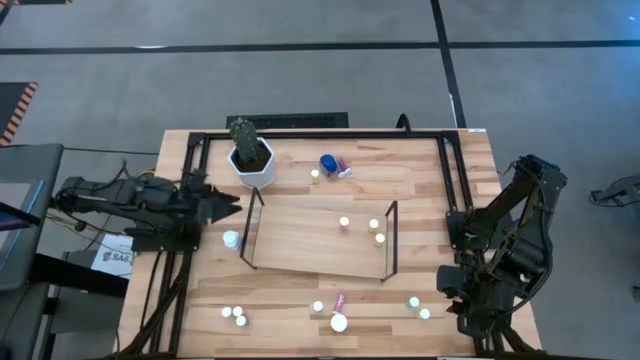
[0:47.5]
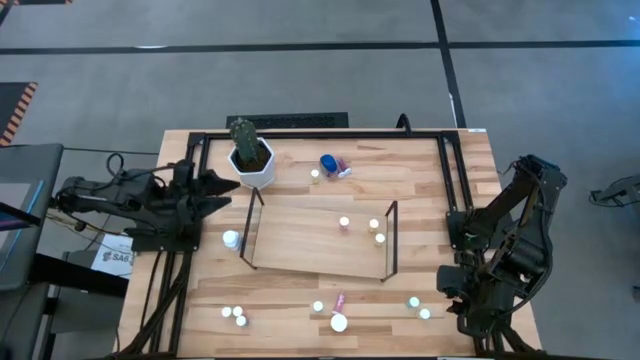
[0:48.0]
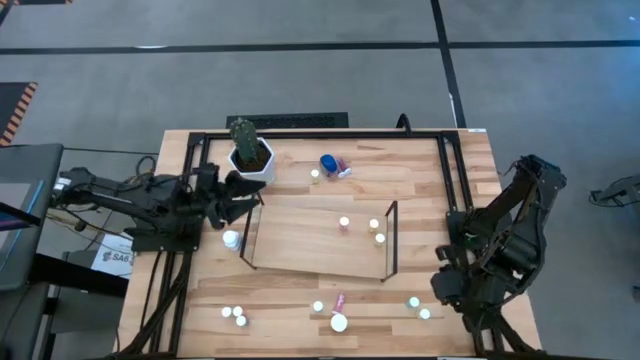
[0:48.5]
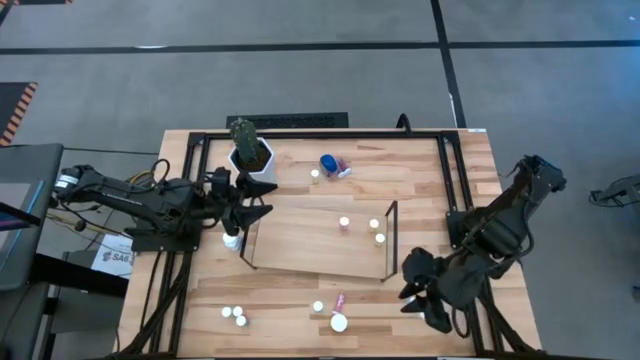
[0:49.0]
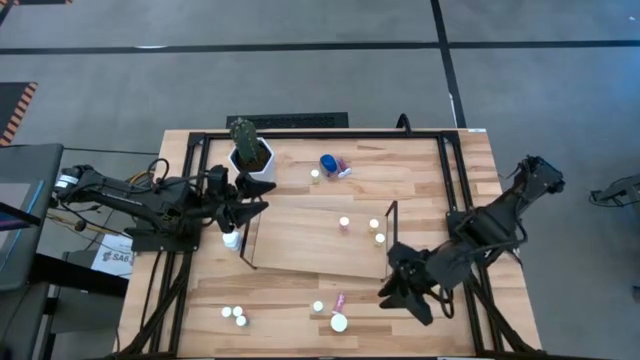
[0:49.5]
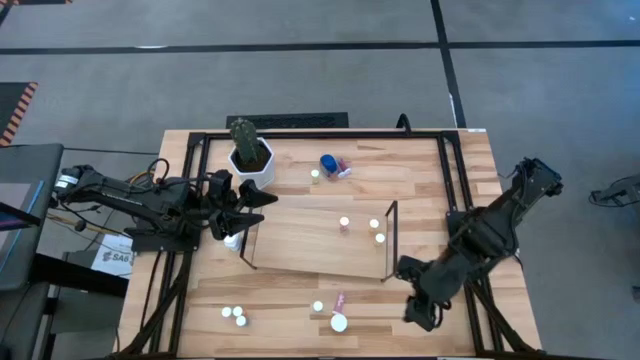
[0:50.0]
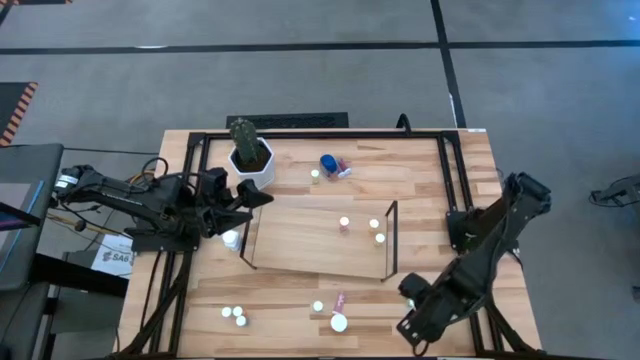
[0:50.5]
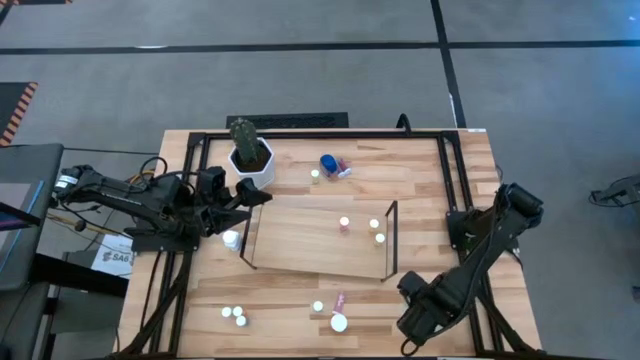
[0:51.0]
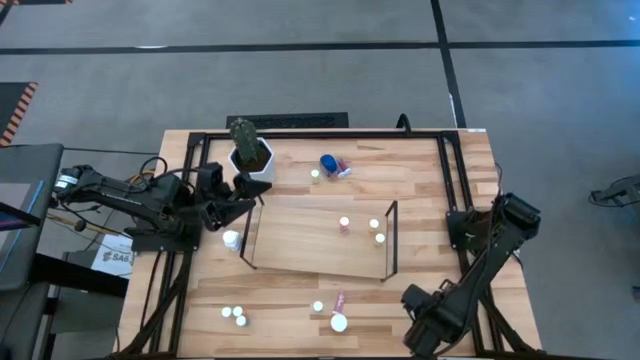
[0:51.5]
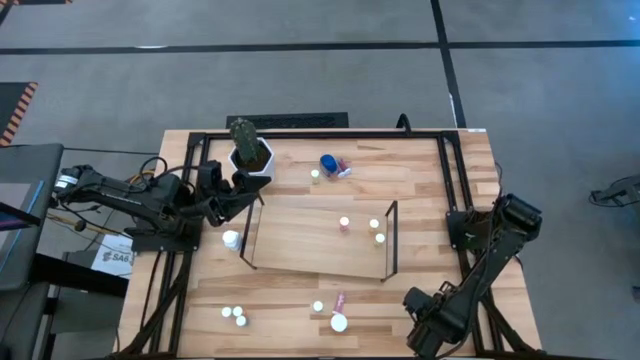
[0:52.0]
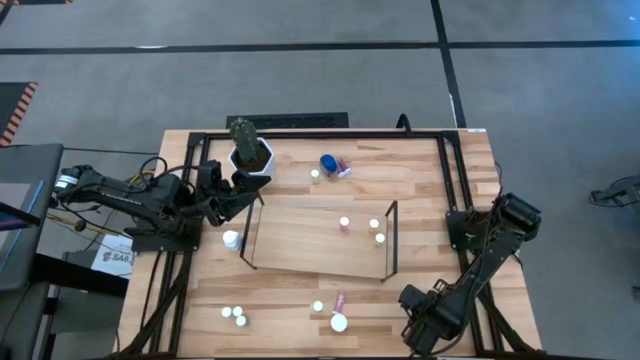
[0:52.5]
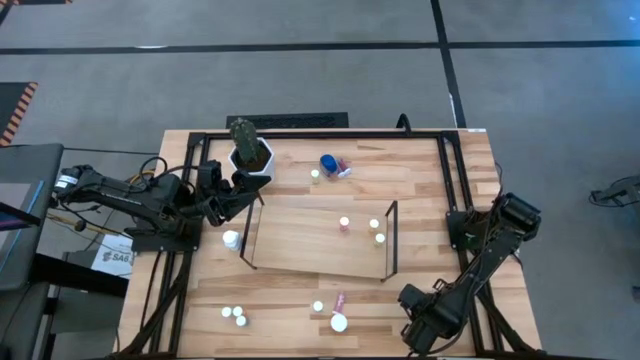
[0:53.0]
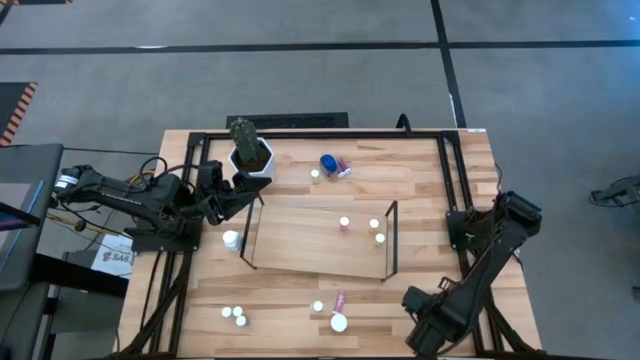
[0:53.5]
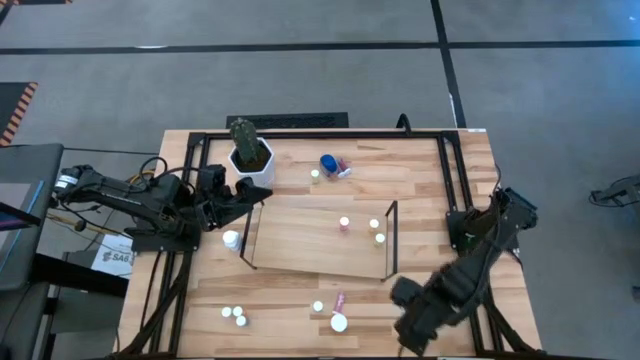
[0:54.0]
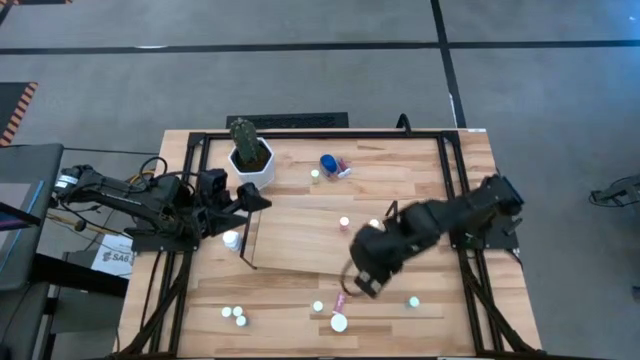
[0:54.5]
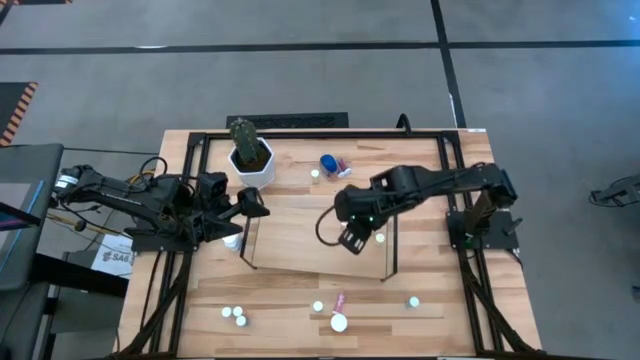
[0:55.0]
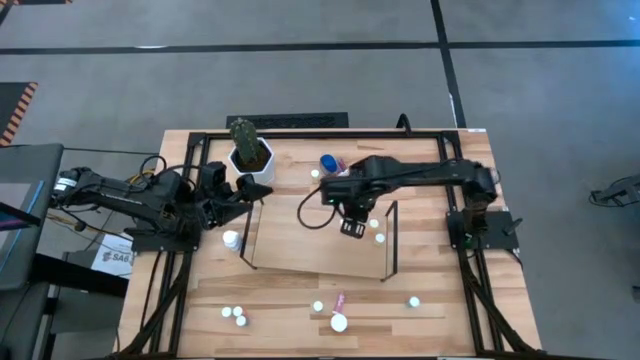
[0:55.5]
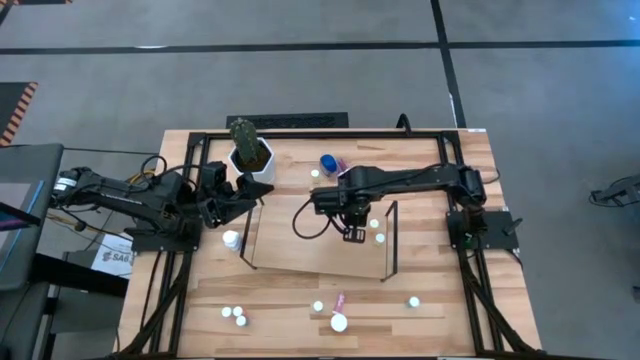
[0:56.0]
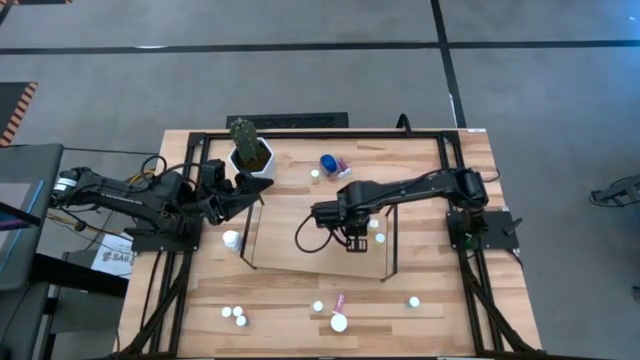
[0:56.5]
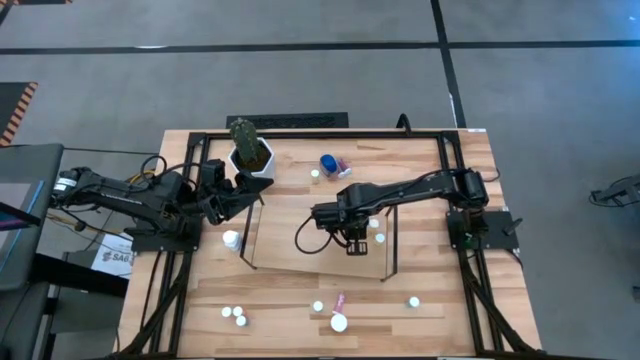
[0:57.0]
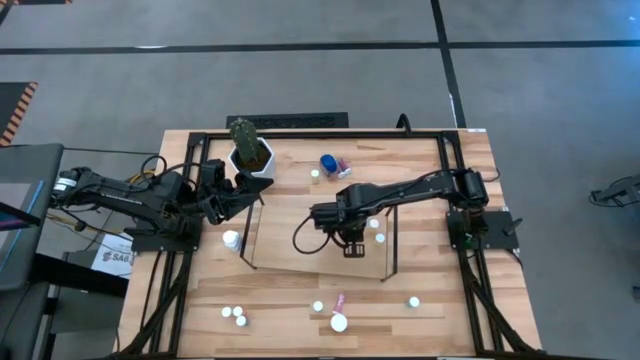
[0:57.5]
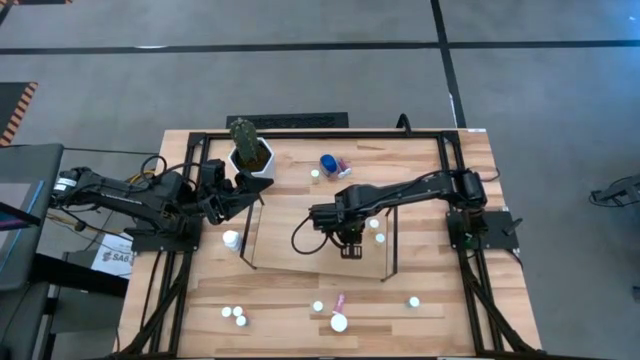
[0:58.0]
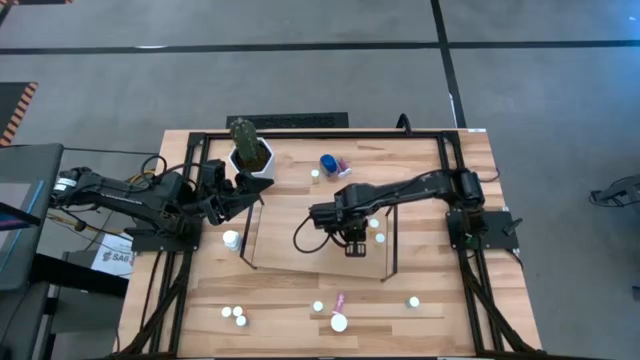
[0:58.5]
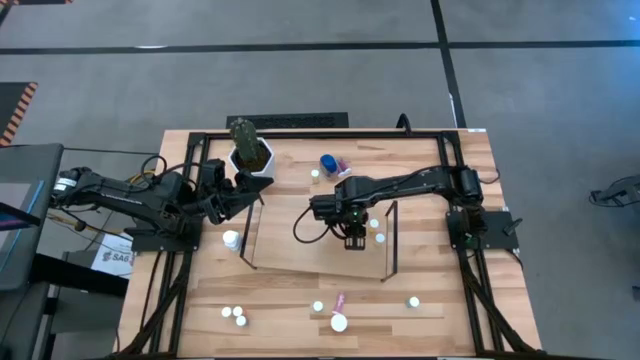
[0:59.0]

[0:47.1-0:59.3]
Task: Pick and place medicine bottles onto shelf by color
Put the orange pill bottle on the shelf

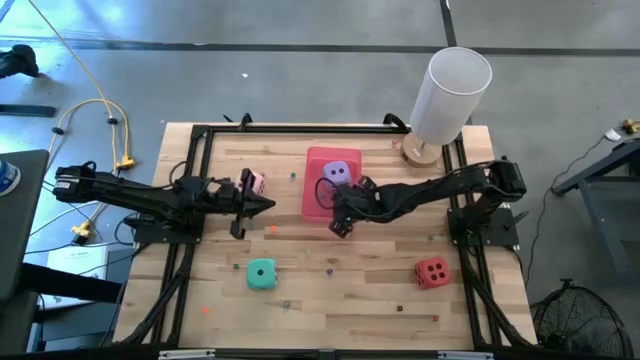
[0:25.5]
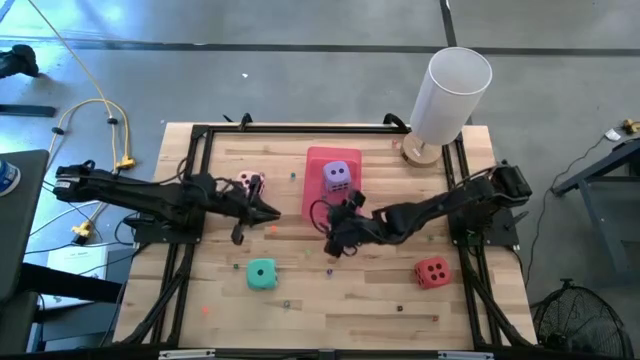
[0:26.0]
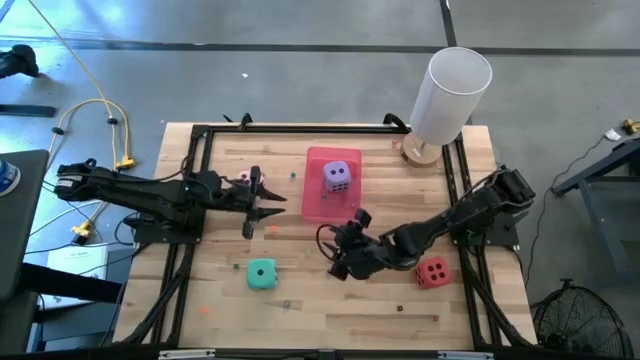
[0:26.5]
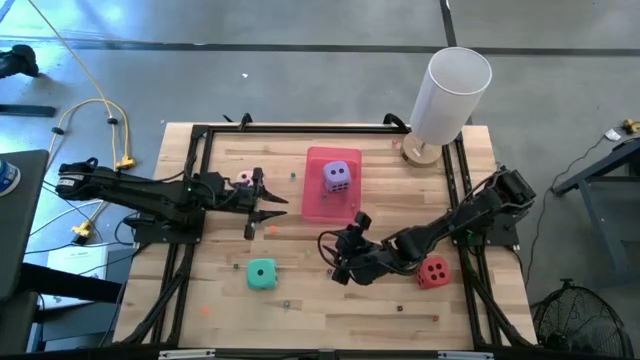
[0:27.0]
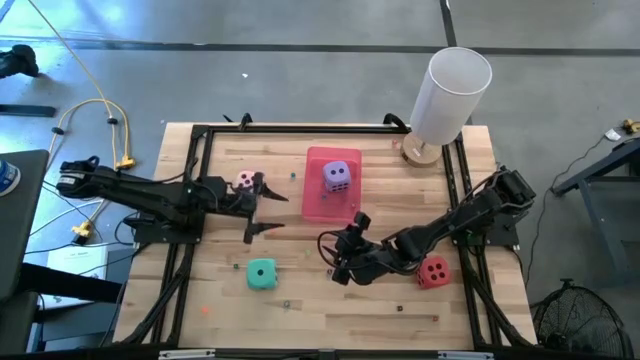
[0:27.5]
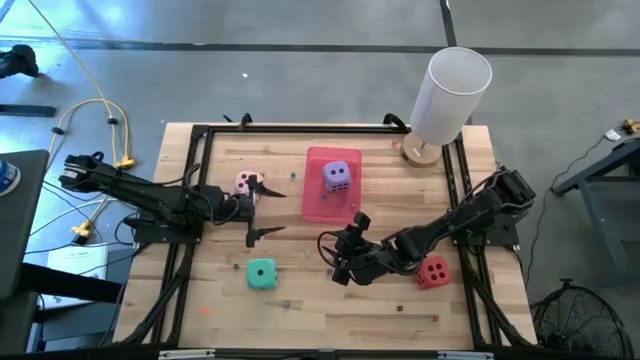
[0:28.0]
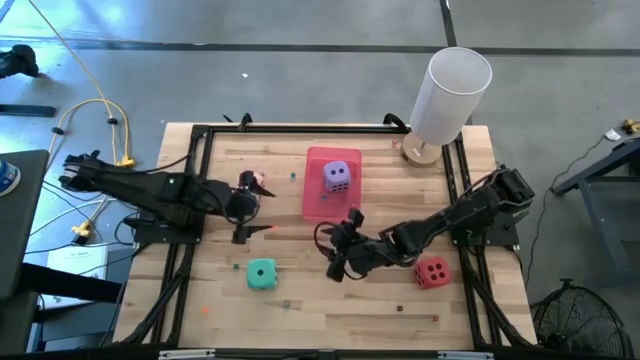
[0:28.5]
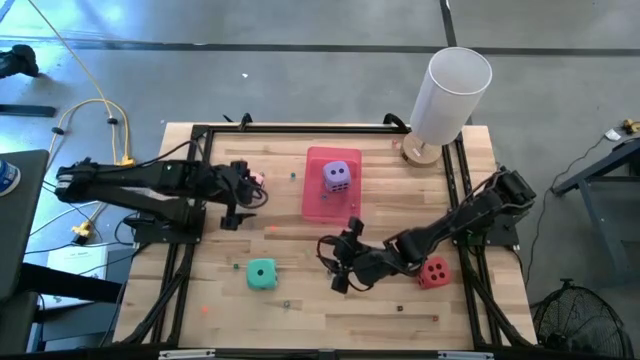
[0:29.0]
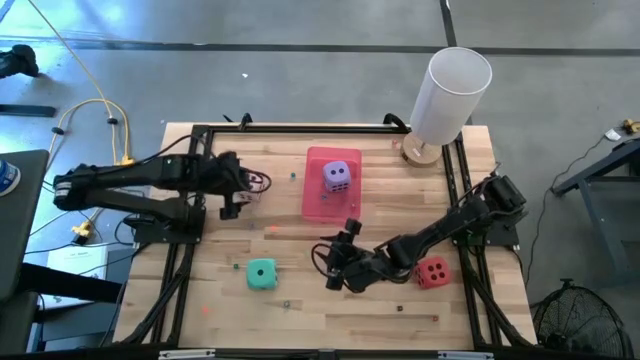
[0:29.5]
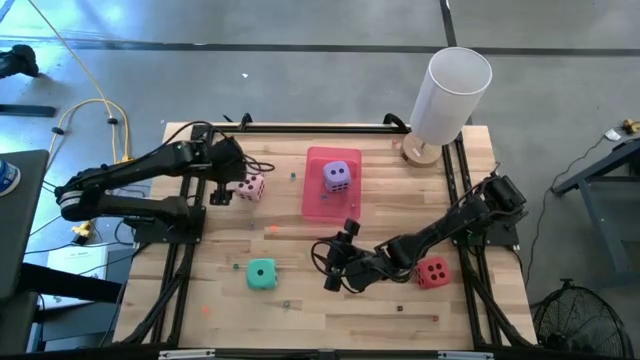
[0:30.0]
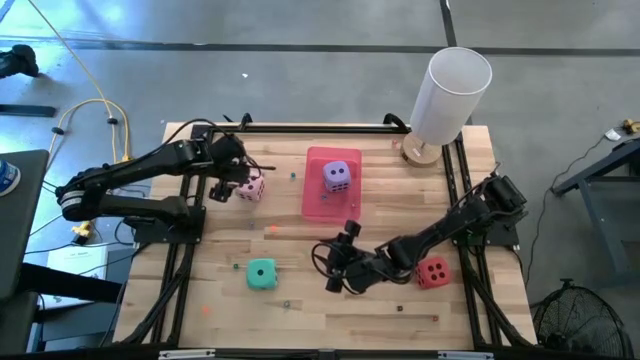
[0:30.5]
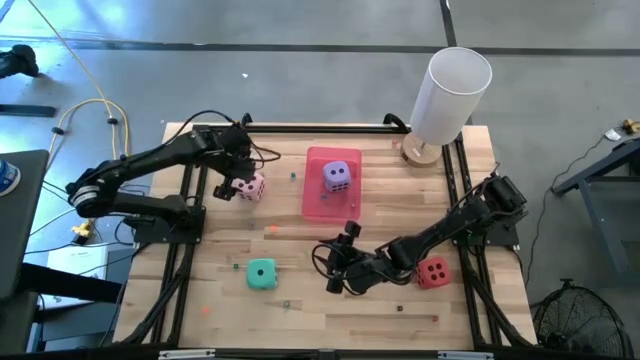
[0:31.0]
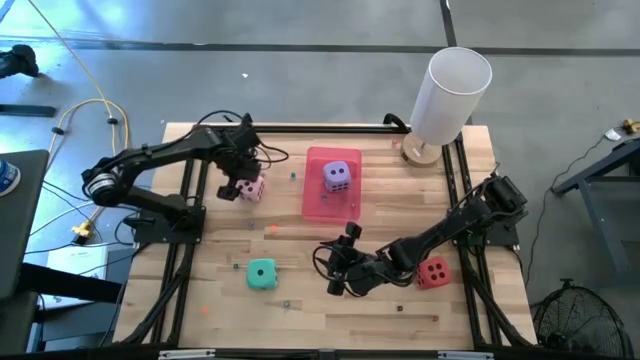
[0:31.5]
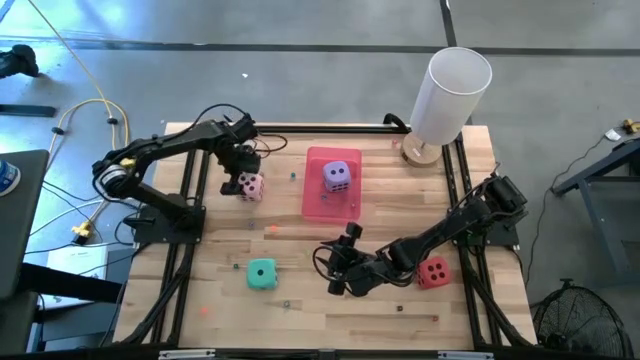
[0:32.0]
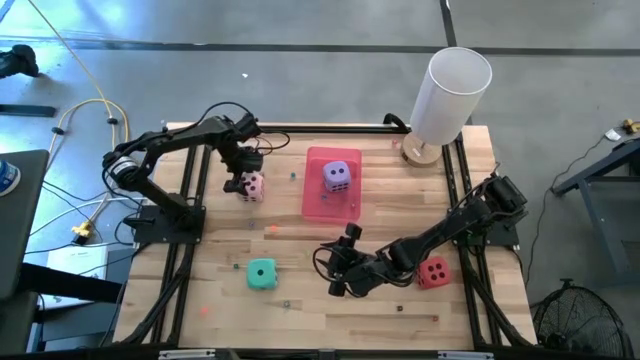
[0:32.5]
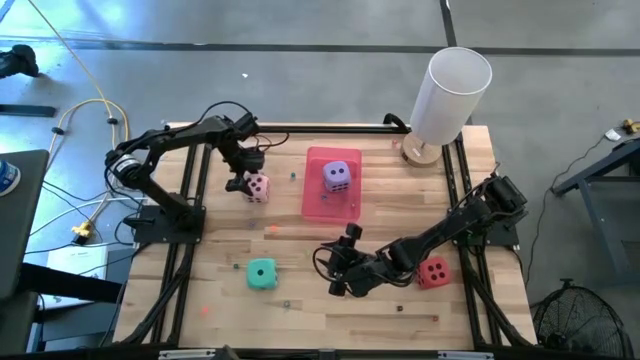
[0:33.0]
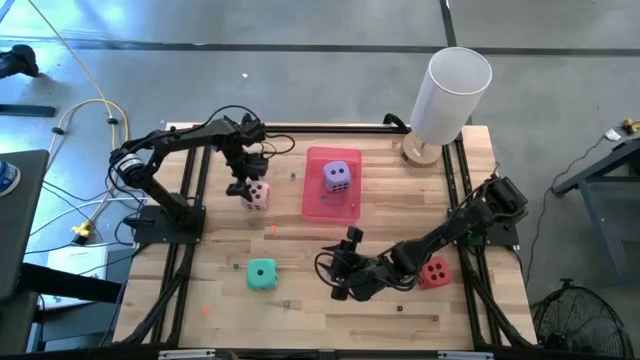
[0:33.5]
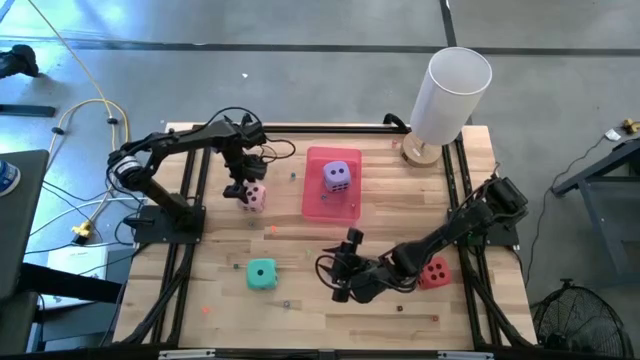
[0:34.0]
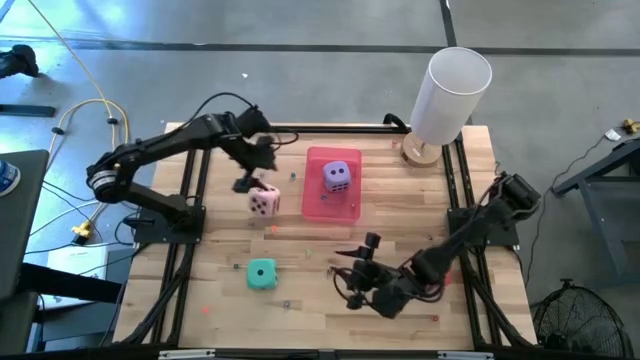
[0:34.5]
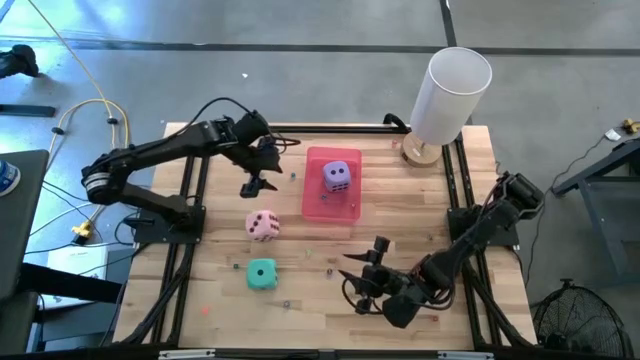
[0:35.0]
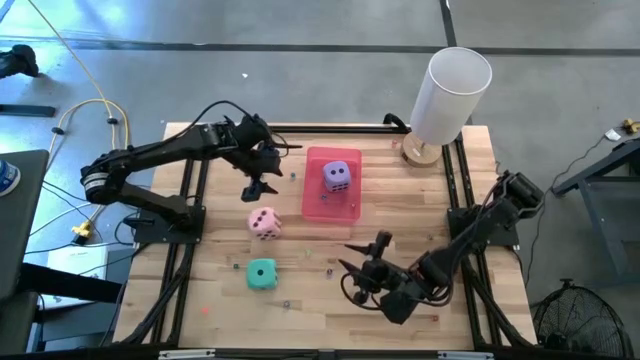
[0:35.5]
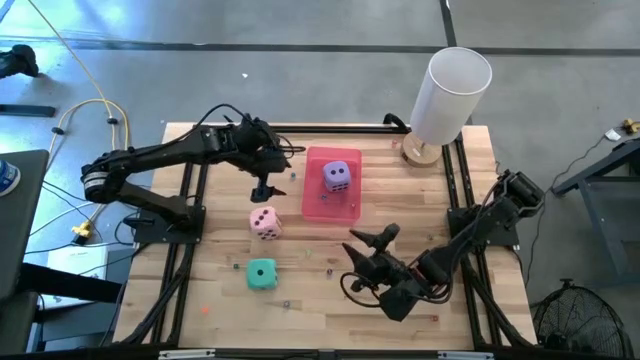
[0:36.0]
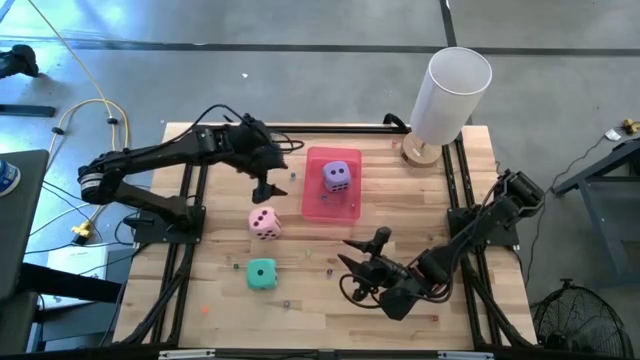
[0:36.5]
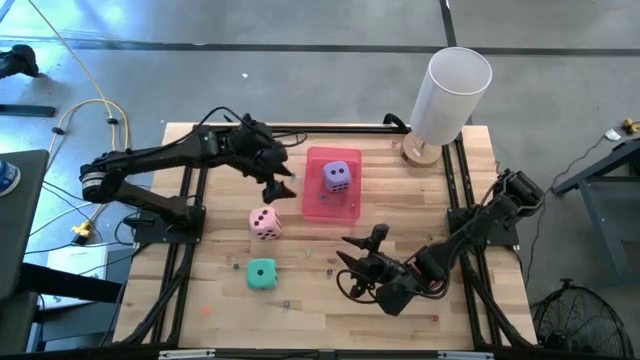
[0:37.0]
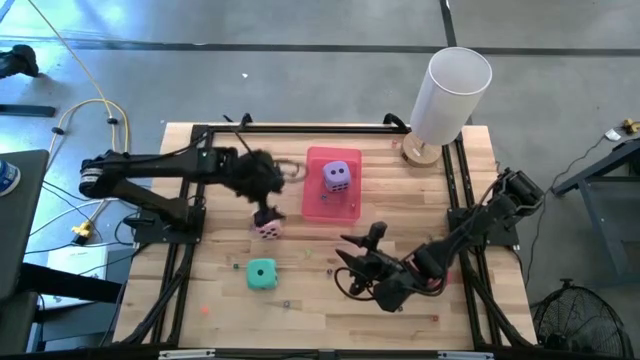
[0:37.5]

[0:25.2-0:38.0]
Task: Pick & Place Dice
Put the large pink die into the red bin
